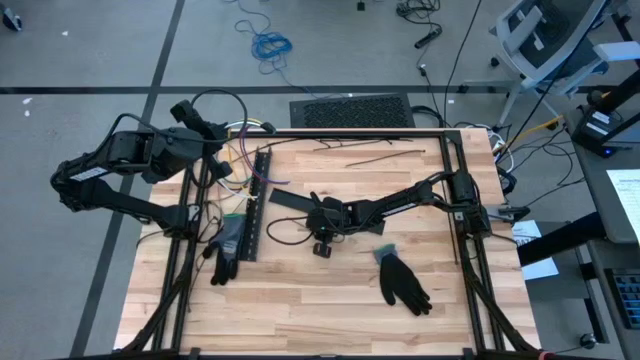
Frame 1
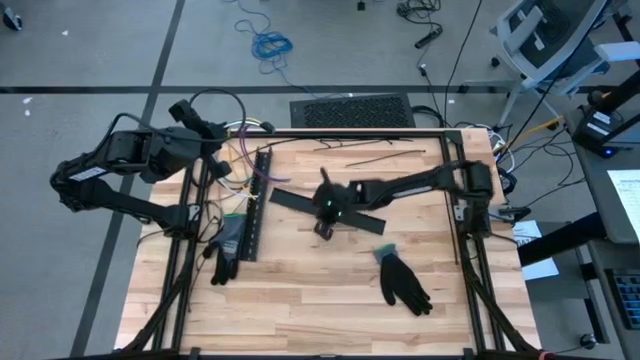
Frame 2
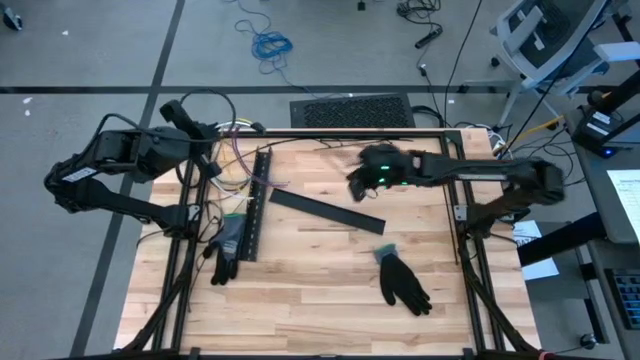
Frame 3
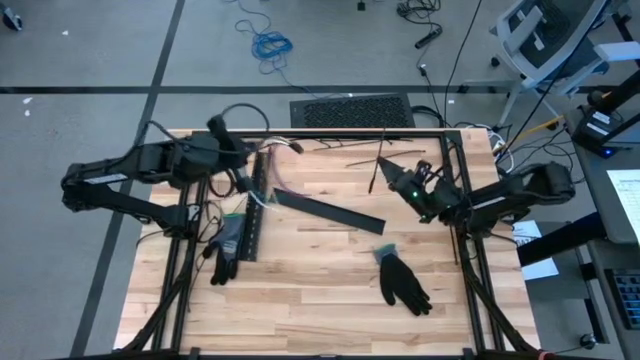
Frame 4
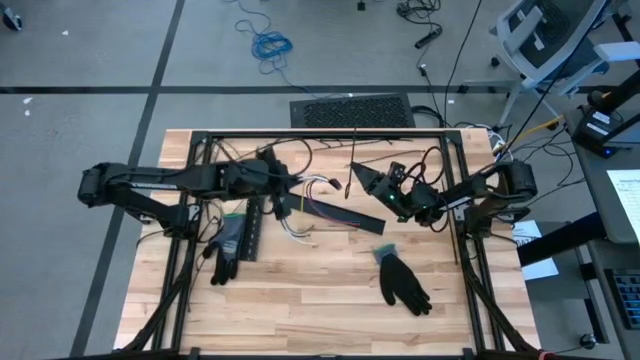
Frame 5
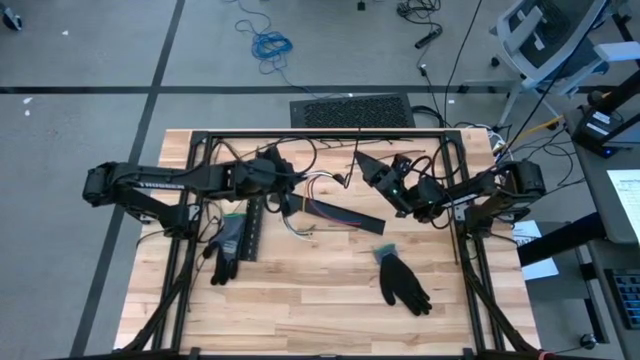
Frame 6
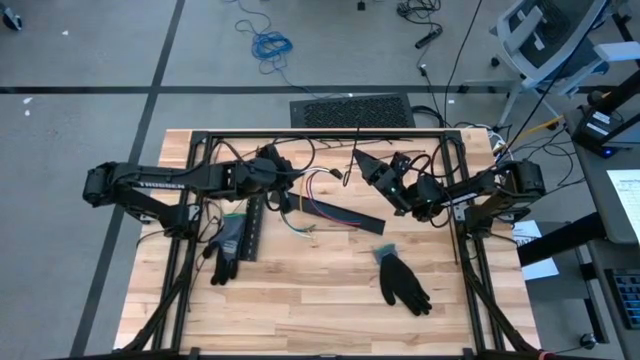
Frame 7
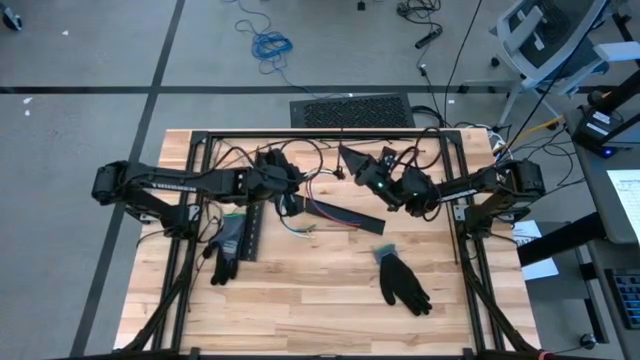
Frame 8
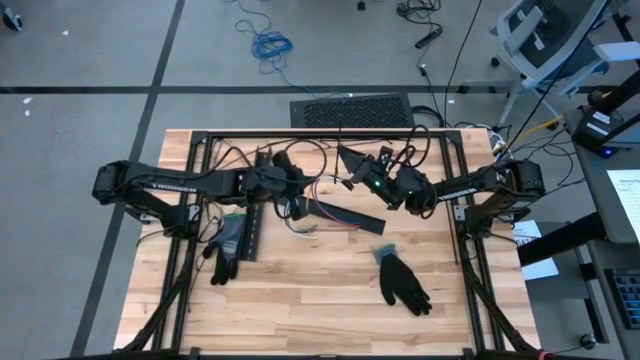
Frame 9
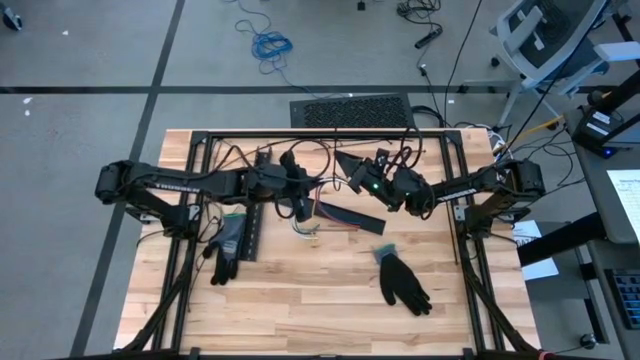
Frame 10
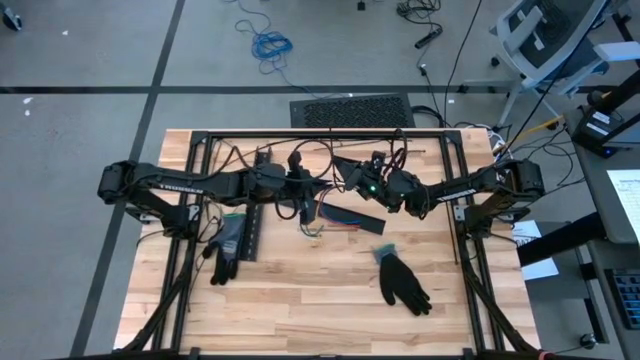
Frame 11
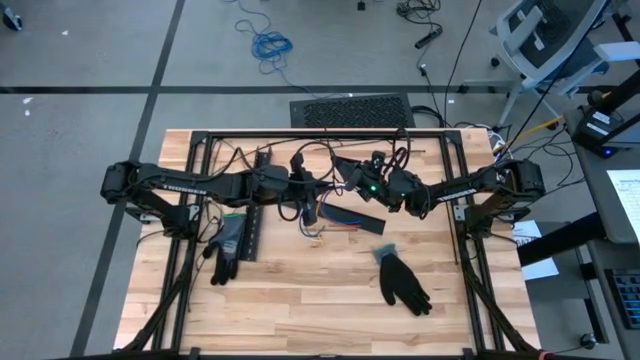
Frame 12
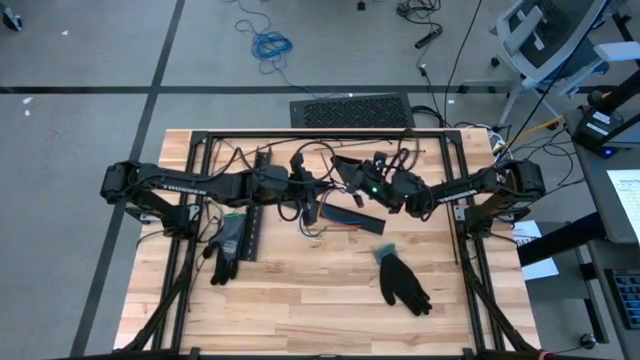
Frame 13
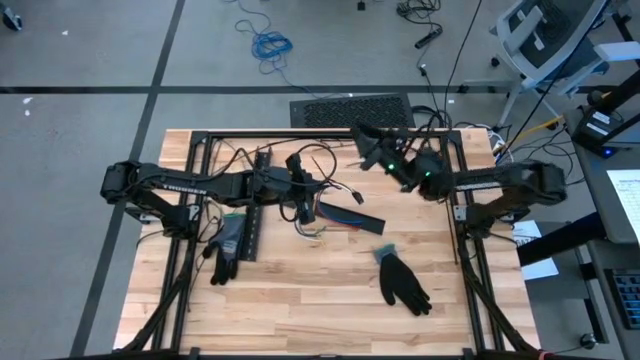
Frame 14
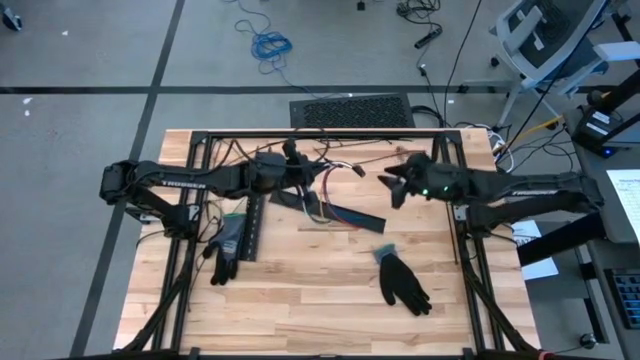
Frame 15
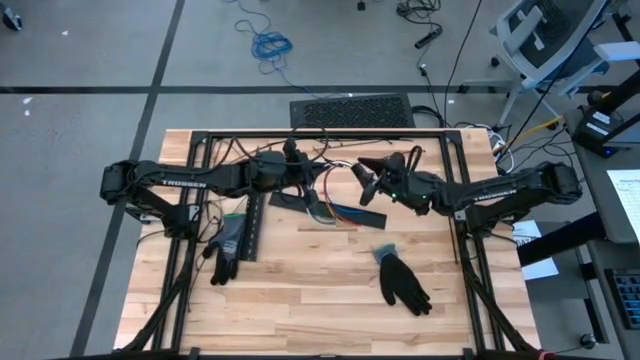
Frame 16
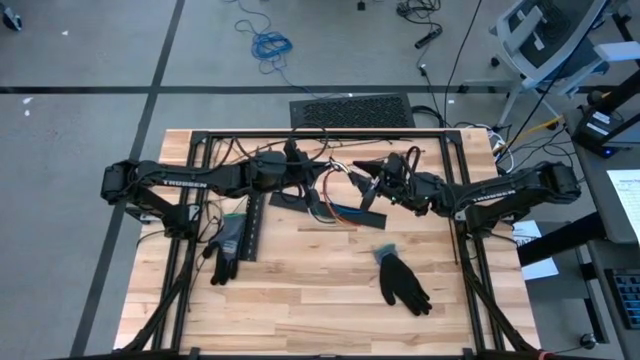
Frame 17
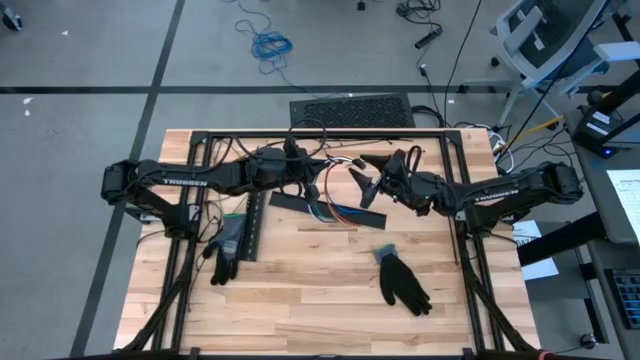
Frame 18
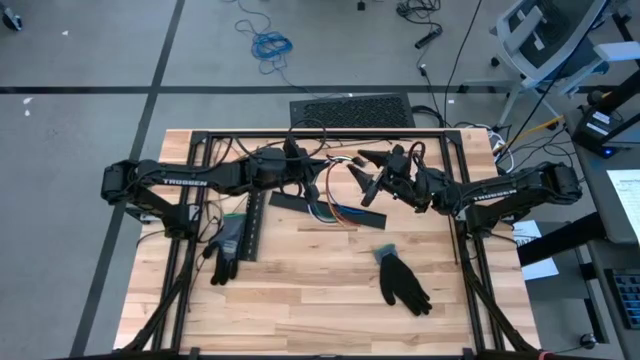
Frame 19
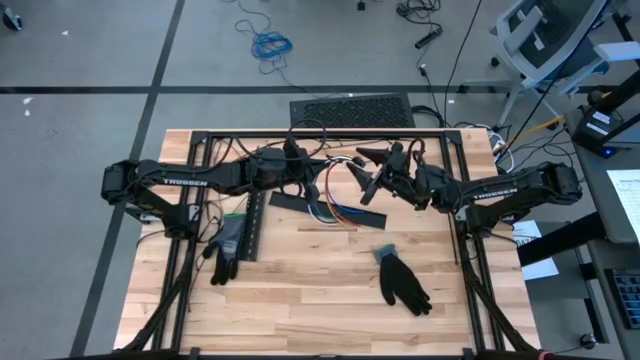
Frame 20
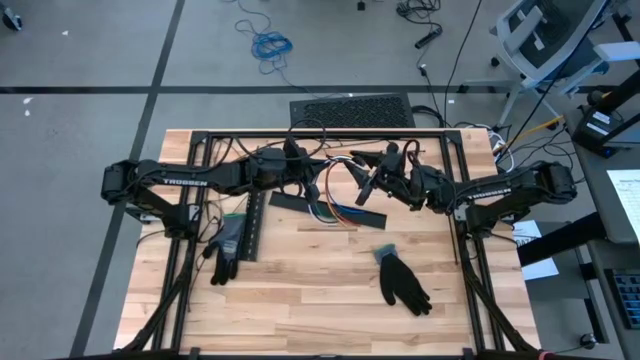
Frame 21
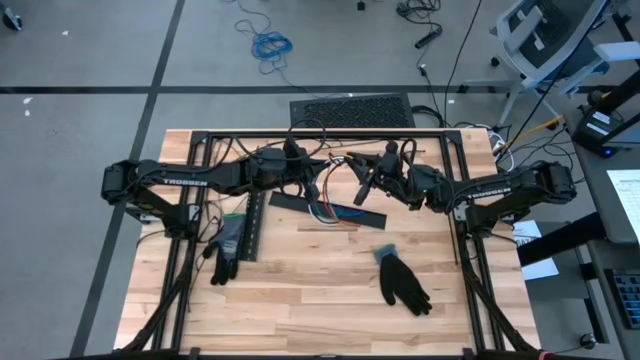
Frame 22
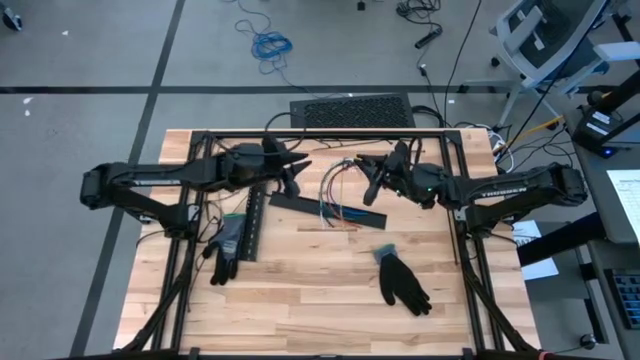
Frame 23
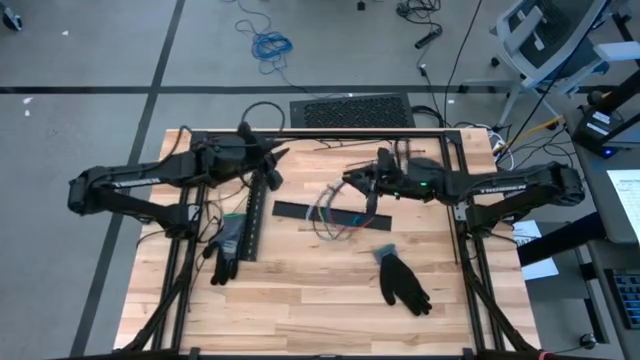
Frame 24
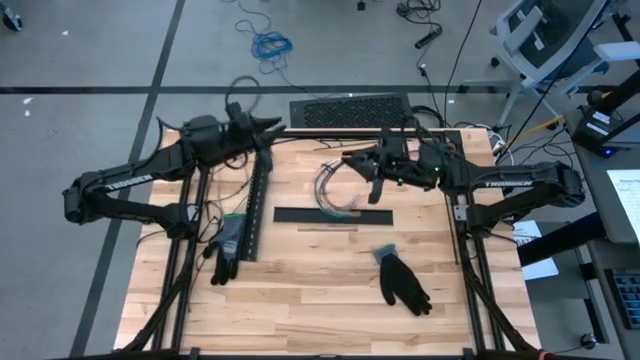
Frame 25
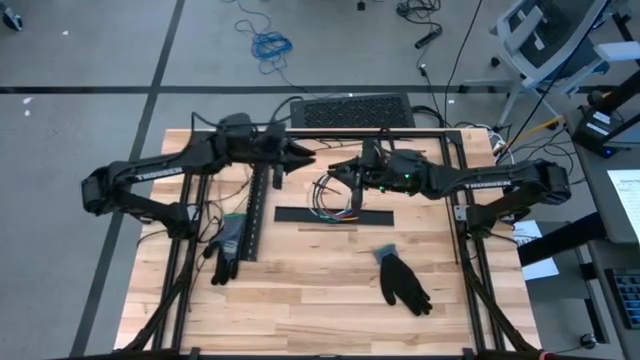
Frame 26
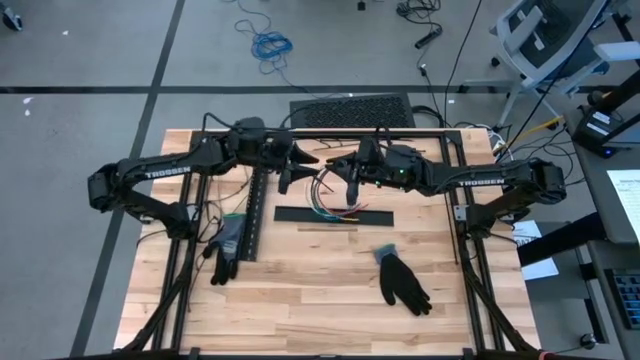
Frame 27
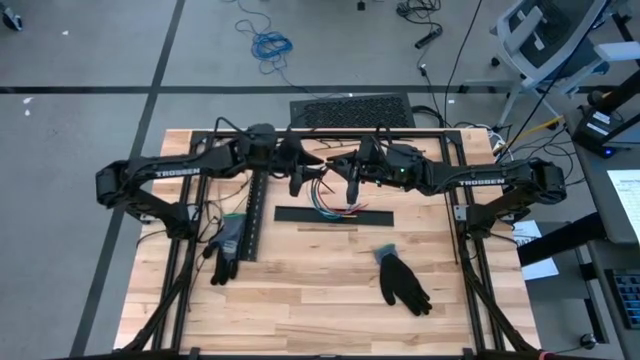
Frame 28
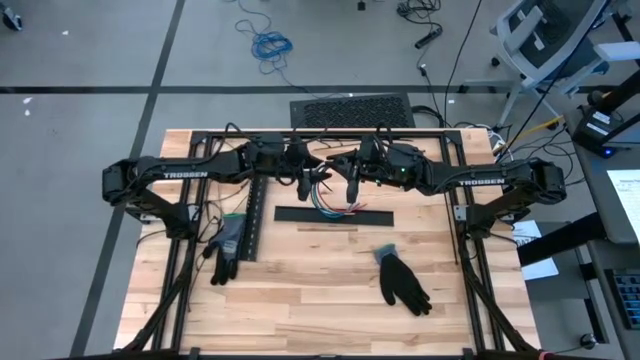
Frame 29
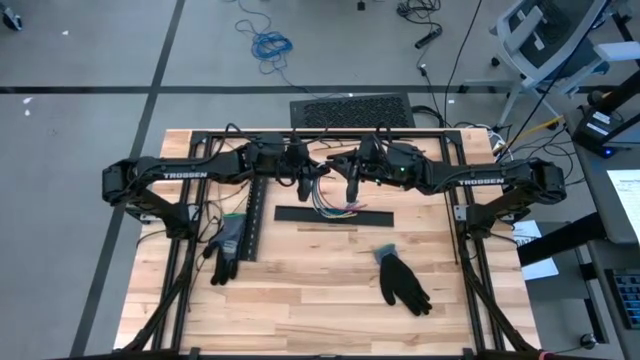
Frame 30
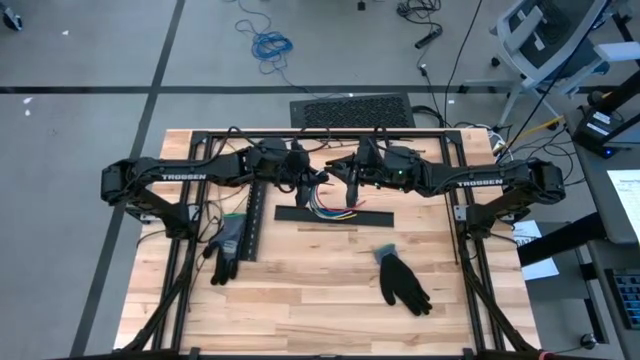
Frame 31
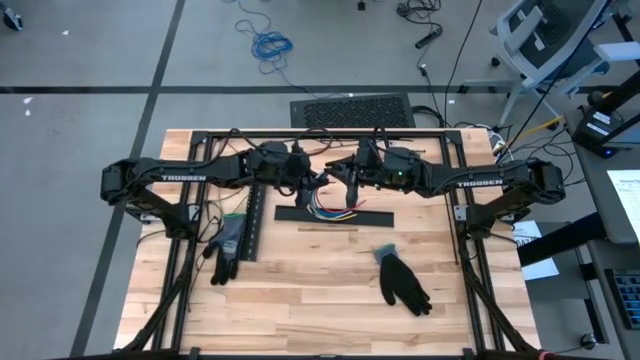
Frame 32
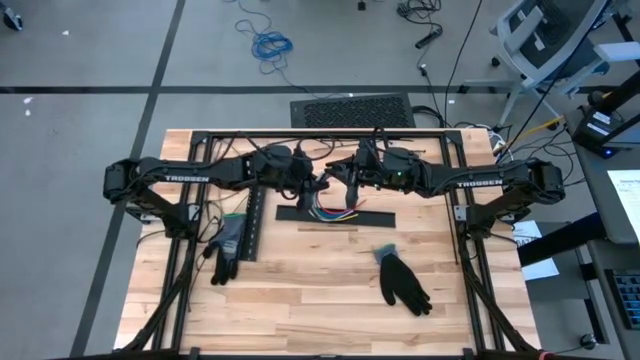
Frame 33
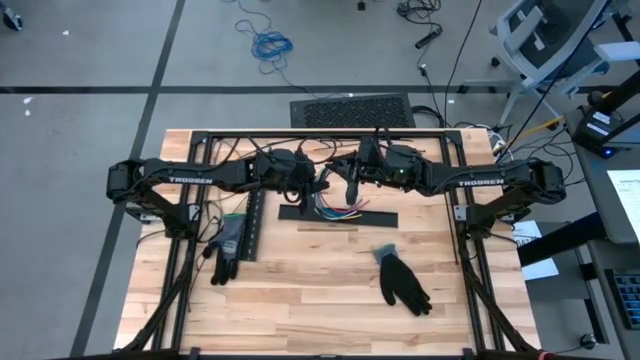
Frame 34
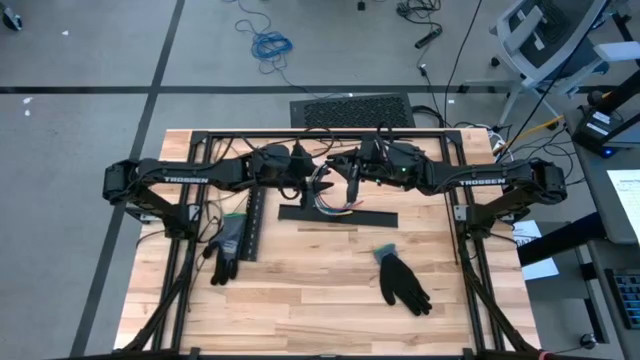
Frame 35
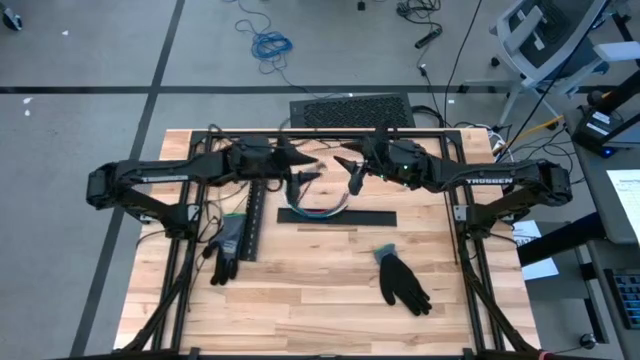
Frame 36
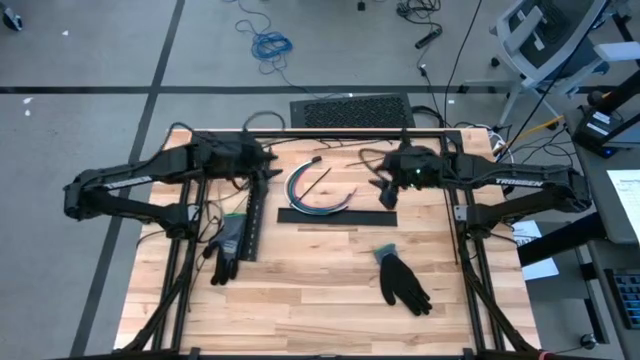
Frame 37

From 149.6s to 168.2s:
Task: Ziptie cables
Wrap the cable wires with the black ziptie
